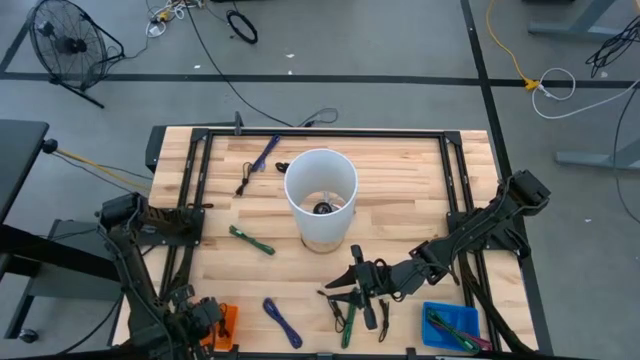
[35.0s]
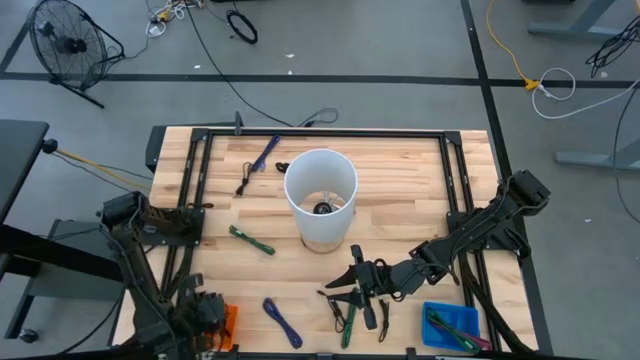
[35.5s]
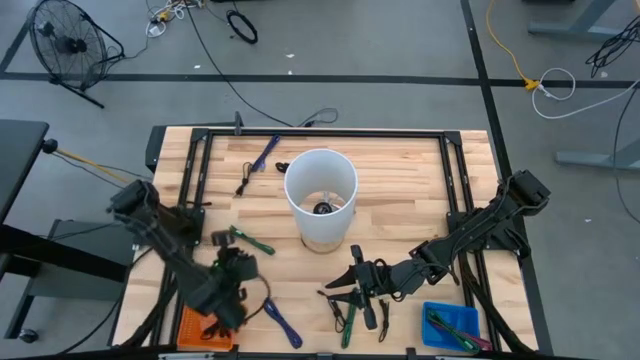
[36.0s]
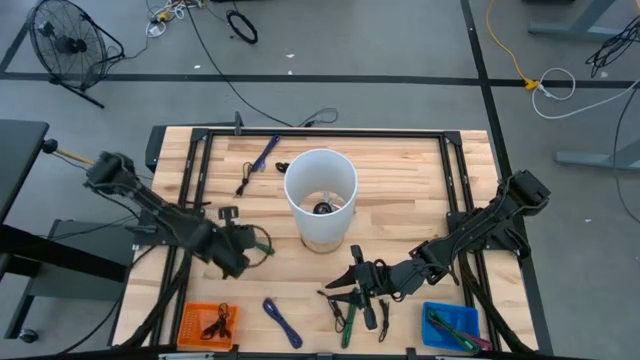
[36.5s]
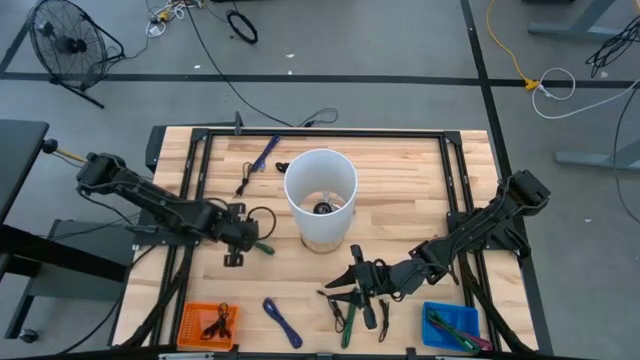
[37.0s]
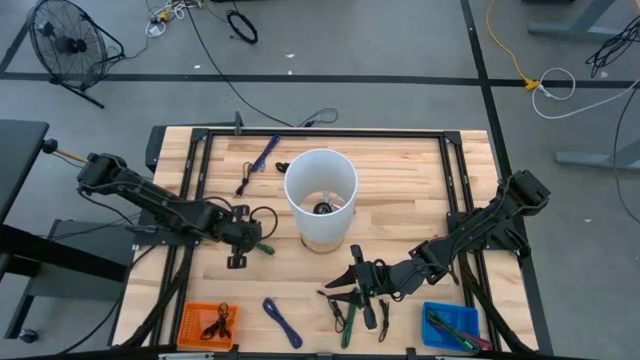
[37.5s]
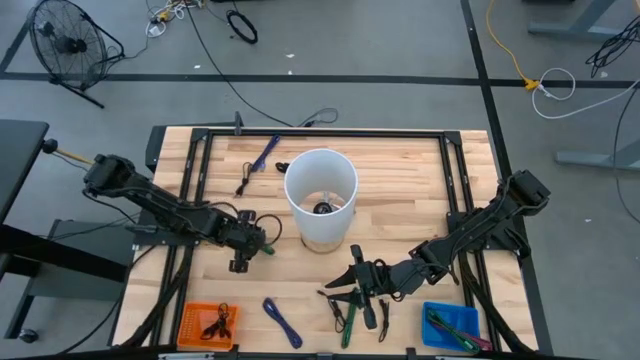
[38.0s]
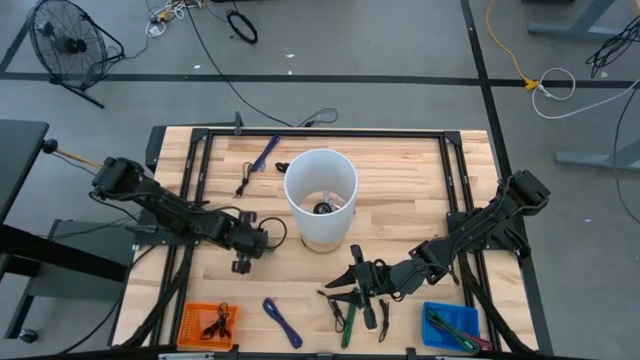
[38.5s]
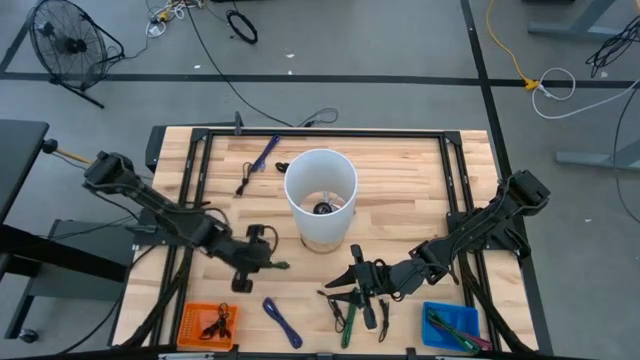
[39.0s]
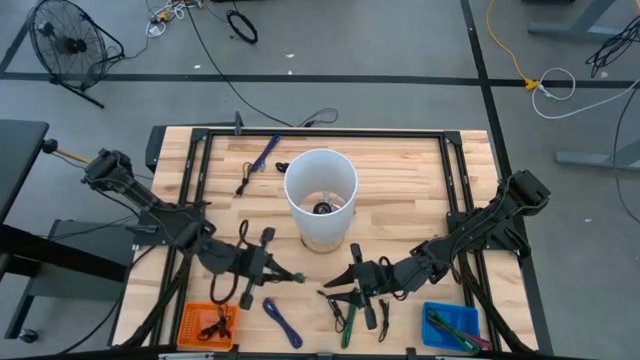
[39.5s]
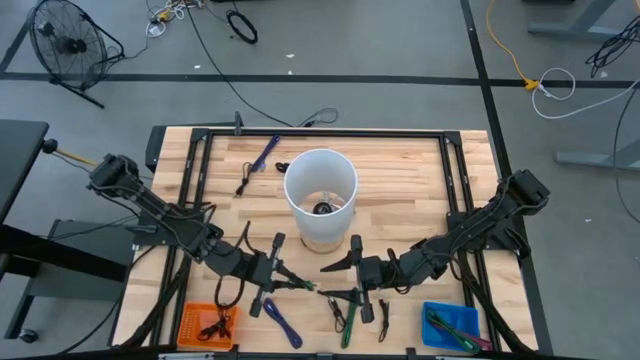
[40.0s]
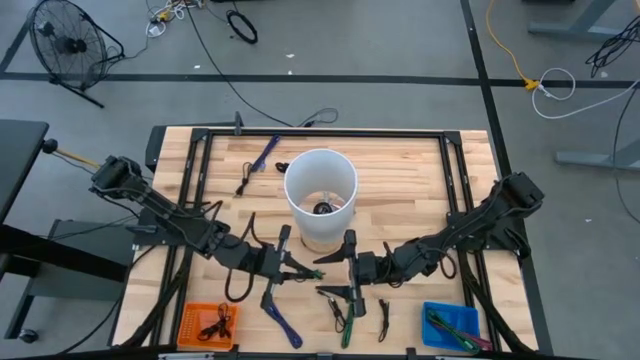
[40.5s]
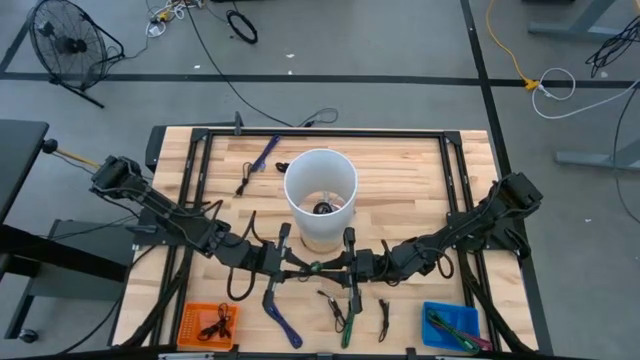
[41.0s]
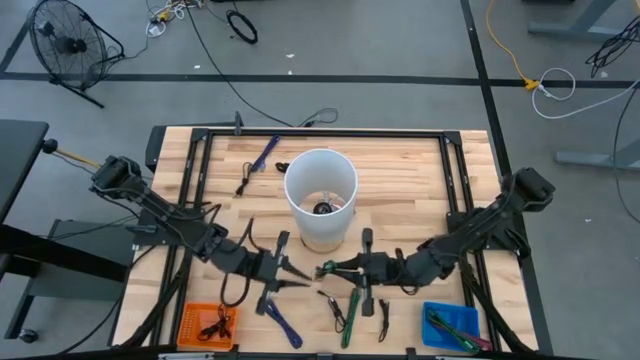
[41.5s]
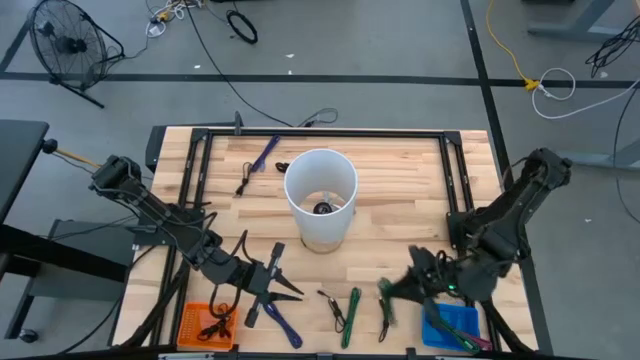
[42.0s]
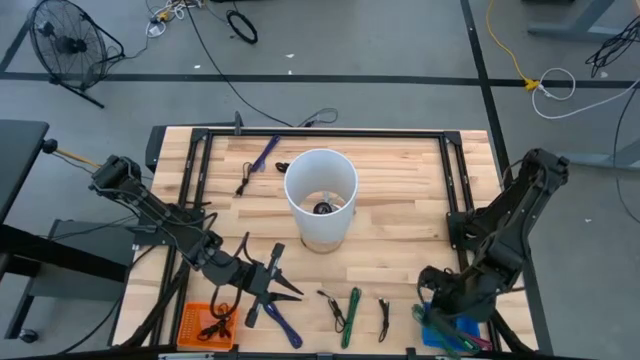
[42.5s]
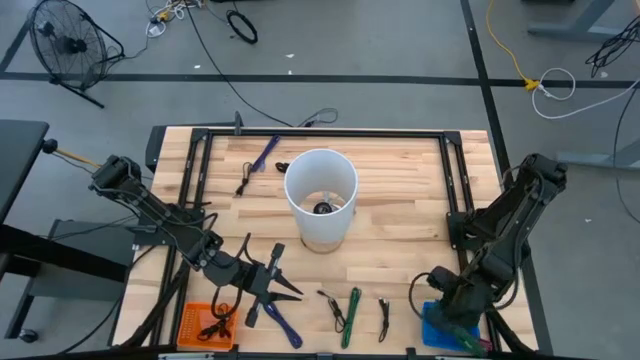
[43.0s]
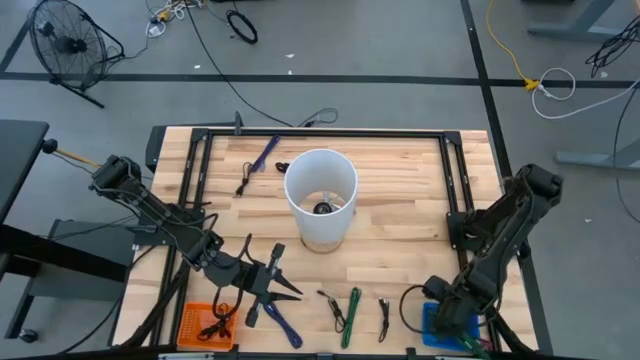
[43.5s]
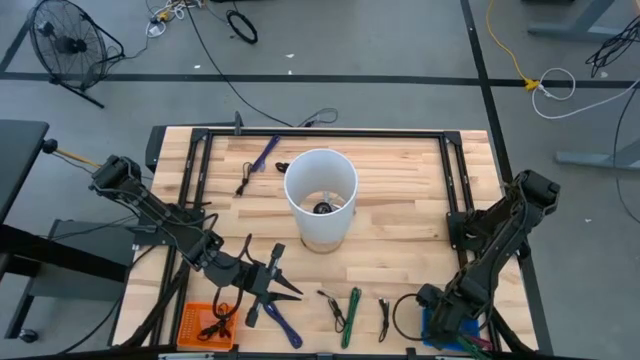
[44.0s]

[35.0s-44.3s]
Task: Pick & Place USB Port
Put the black and green charger cable into the blue bin

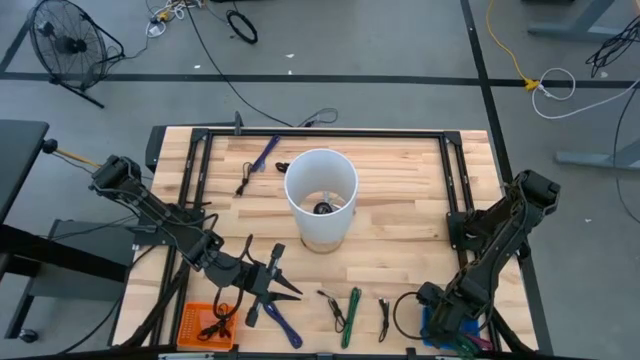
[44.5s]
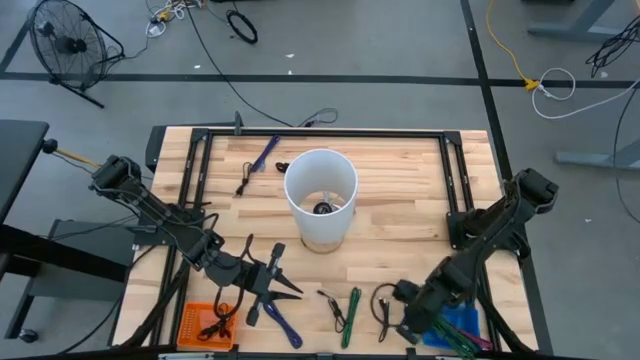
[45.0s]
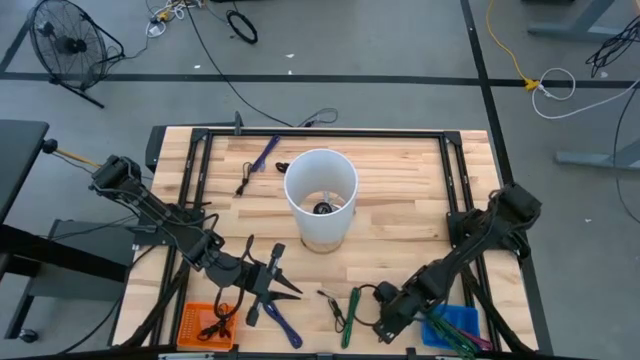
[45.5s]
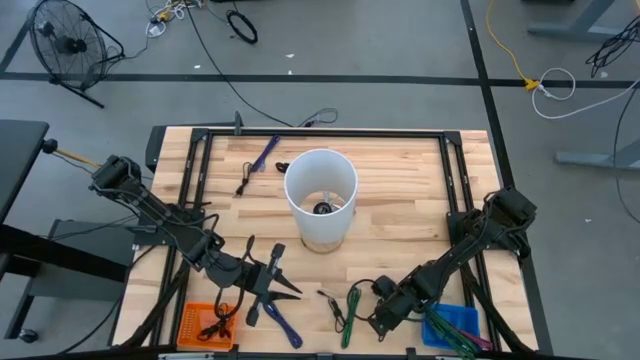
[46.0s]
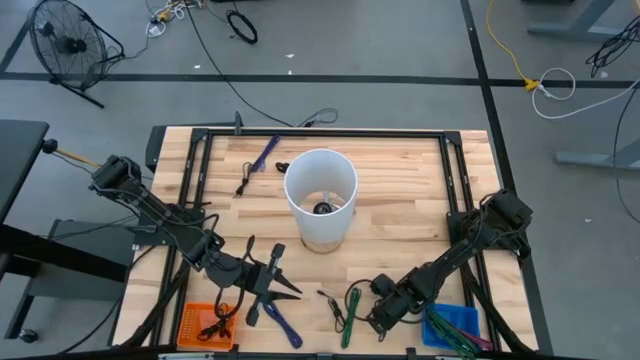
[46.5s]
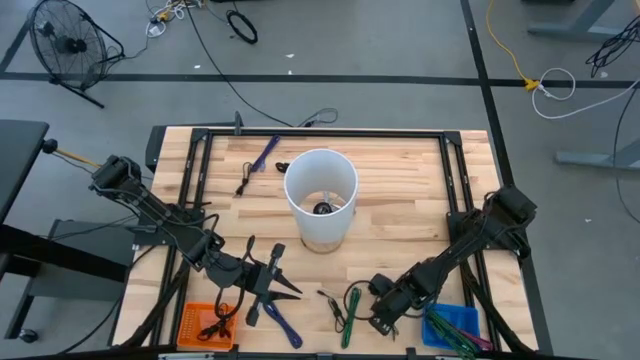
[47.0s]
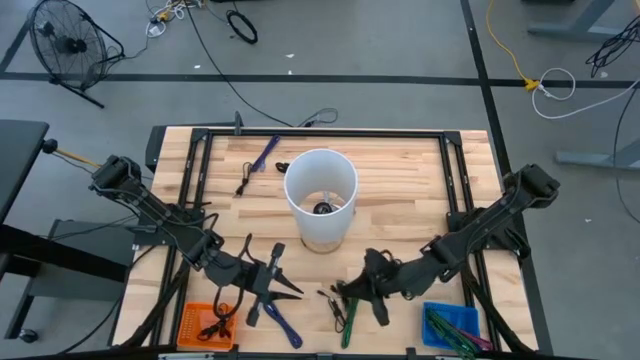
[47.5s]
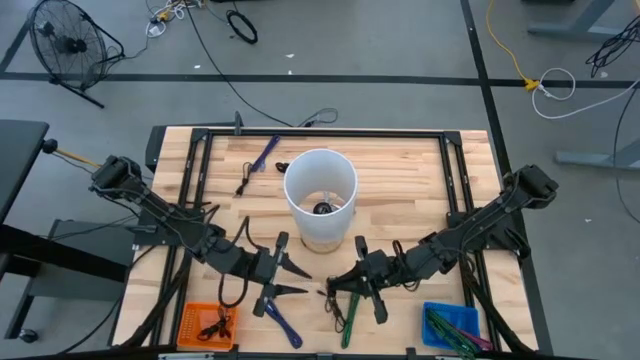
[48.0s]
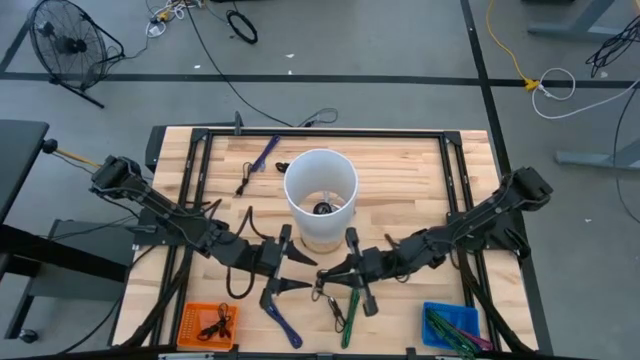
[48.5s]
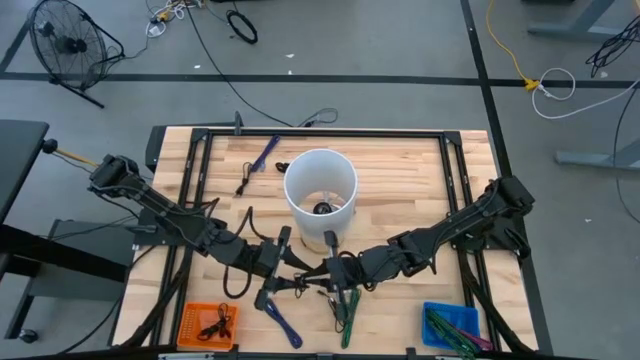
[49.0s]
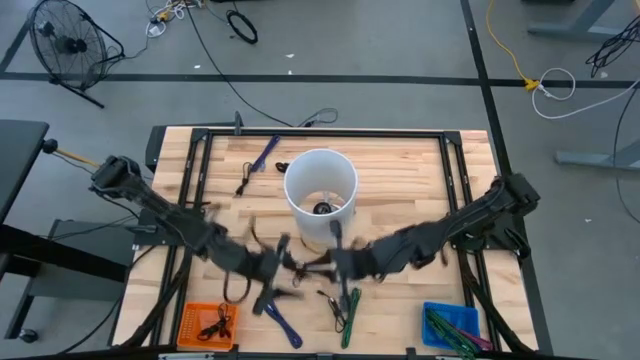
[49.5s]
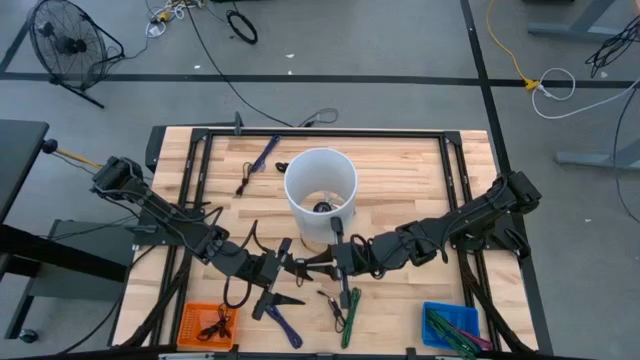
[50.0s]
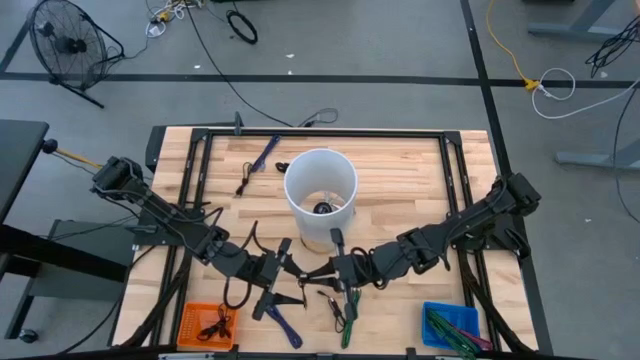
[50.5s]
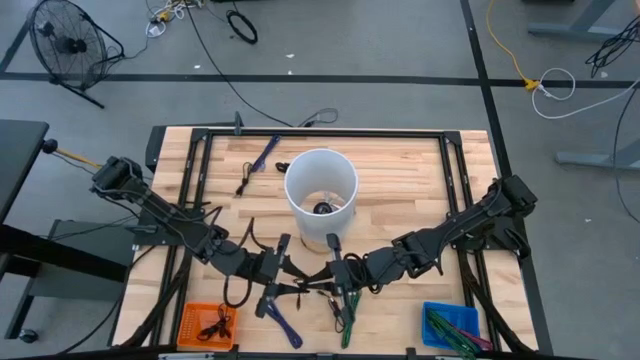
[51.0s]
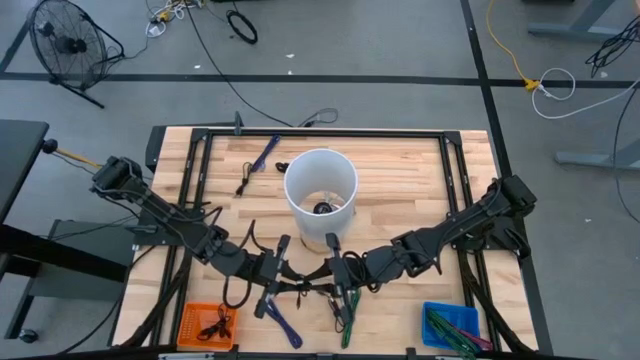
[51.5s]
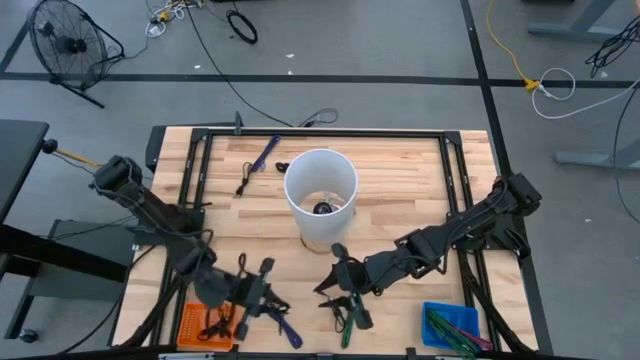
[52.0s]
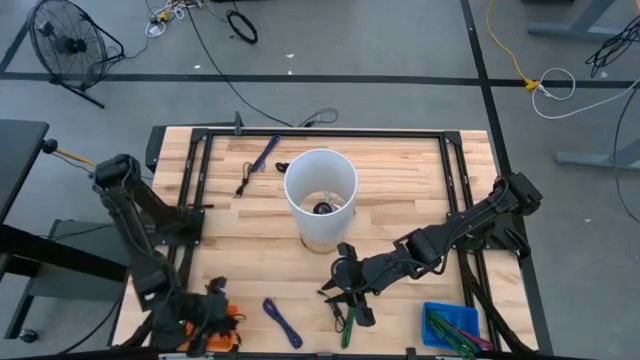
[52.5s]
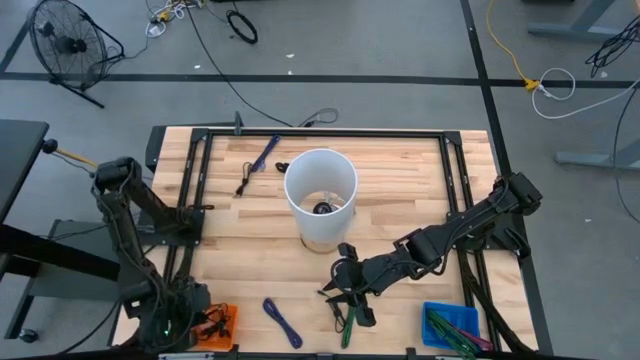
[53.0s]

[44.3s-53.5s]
Put the black charger cable into the orange bin

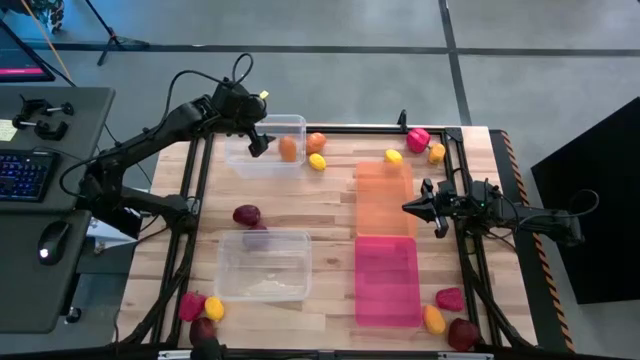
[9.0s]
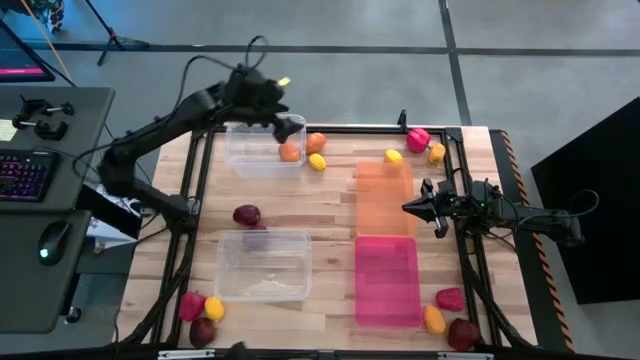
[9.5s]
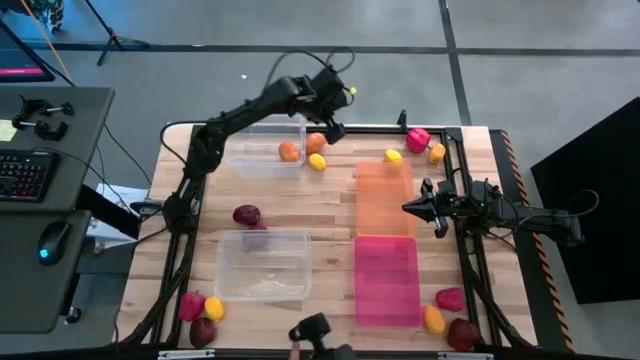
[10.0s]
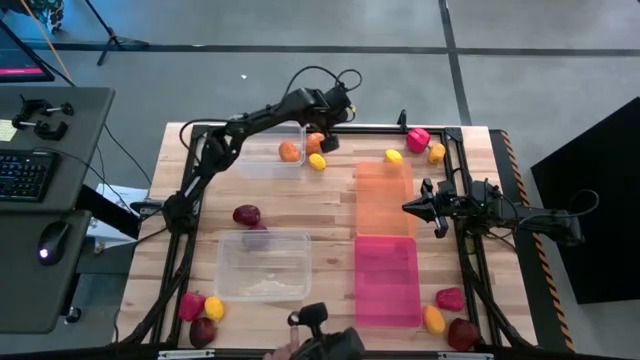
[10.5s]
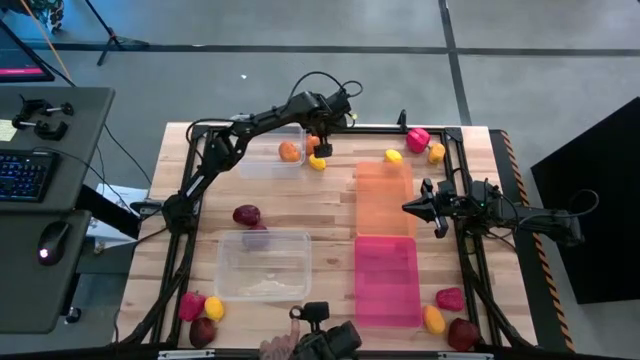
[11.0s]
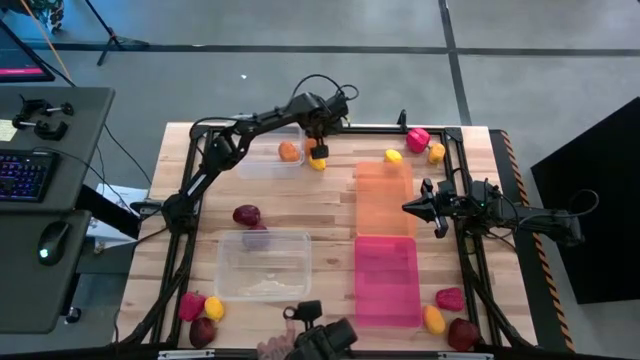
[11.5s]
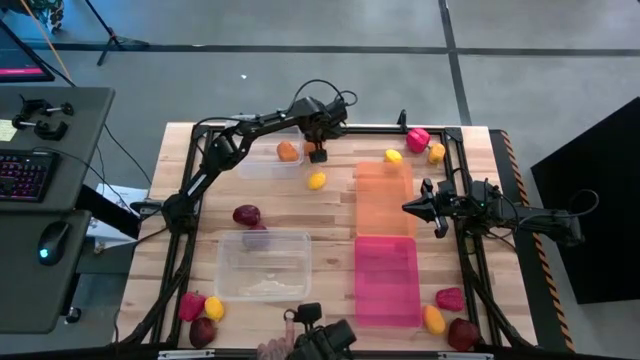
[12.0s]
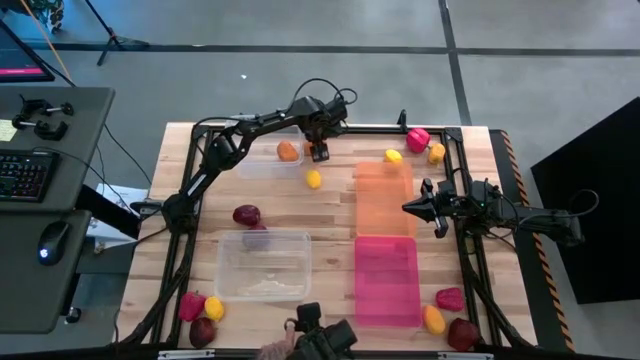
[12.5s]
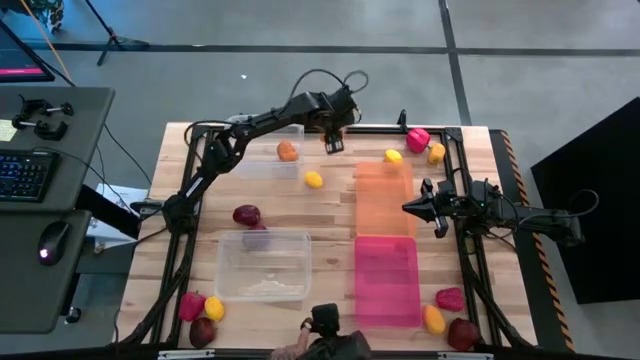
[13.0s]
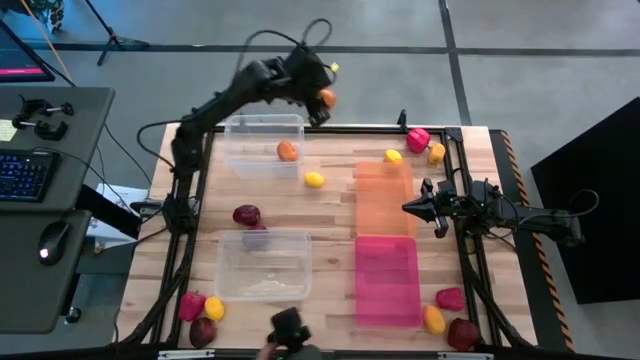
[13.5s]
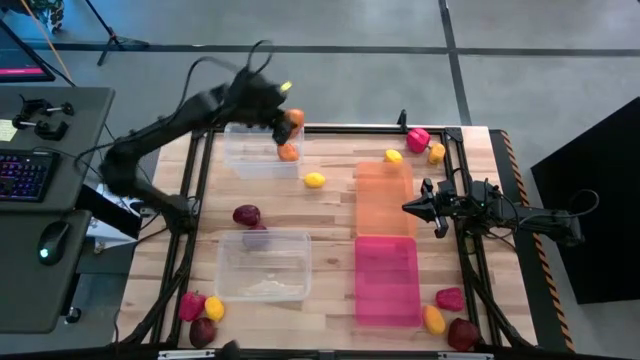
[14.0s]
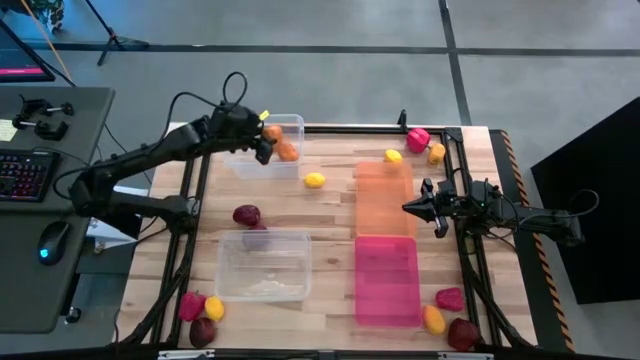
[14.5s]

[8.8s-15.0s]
Task: Sort produce into baskets
Put the yellow mango into the top transparent bin
